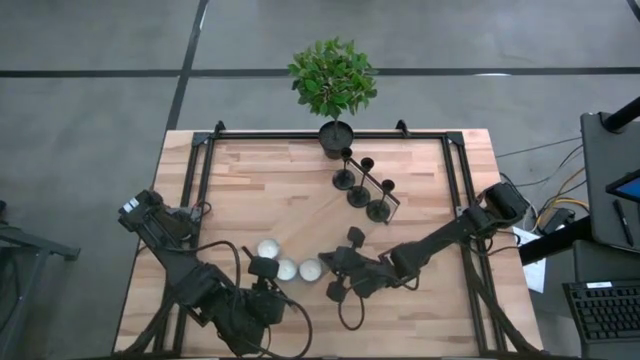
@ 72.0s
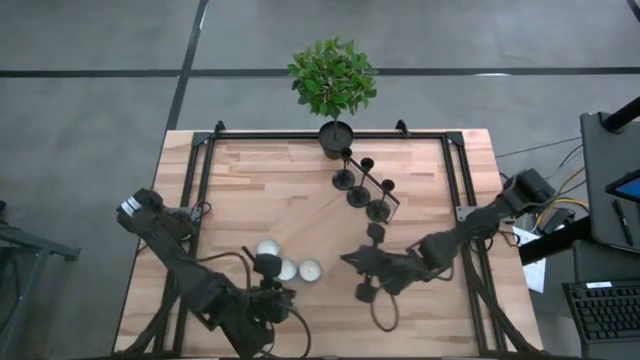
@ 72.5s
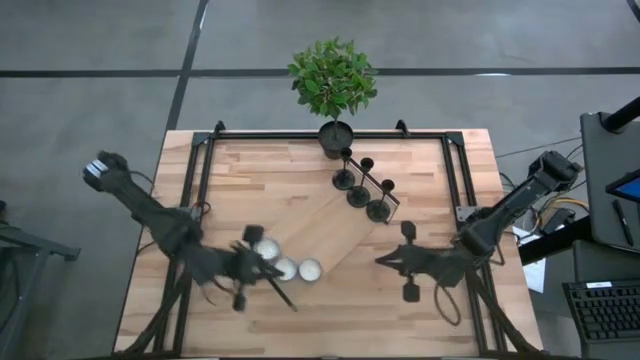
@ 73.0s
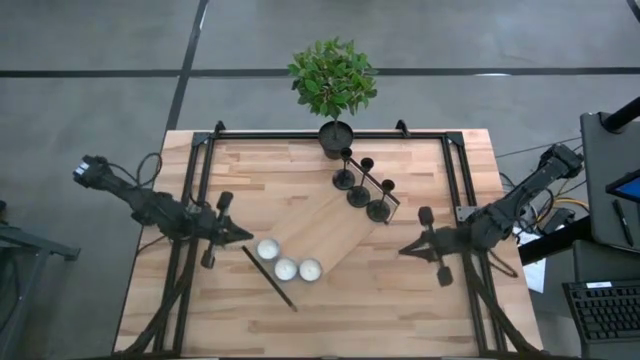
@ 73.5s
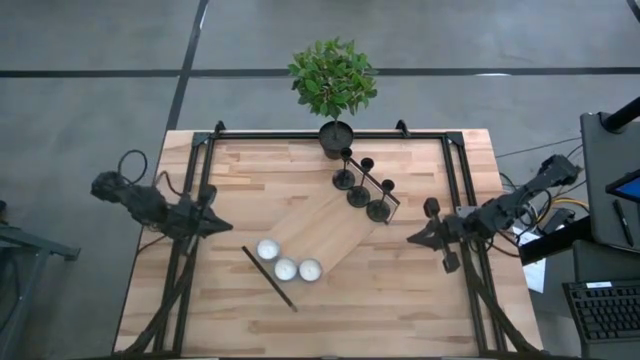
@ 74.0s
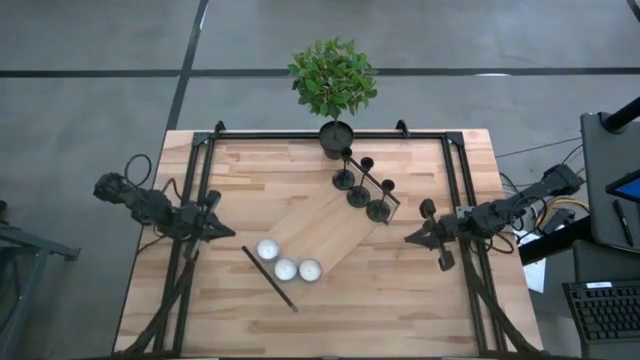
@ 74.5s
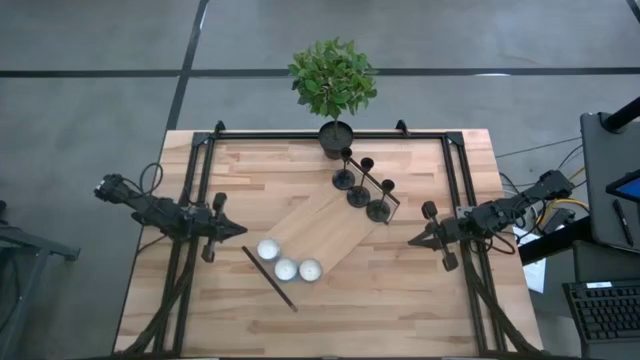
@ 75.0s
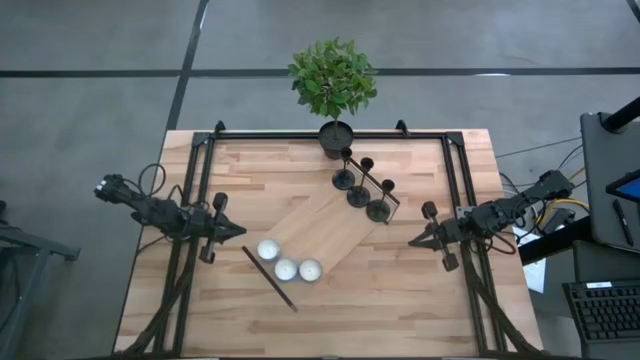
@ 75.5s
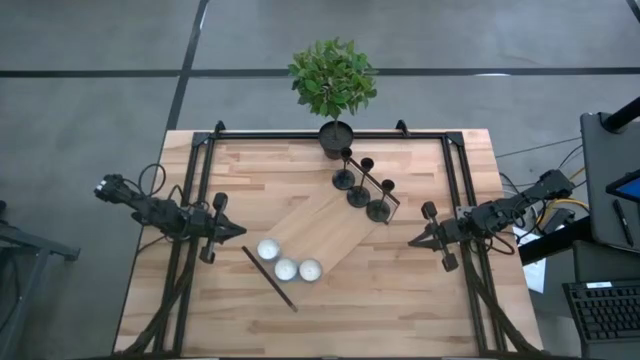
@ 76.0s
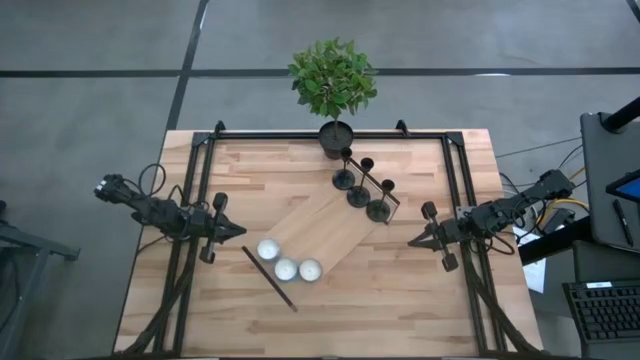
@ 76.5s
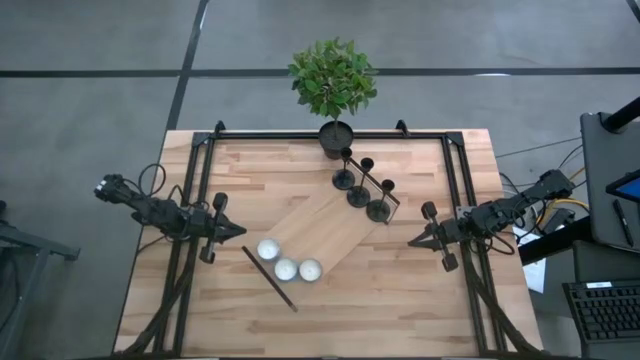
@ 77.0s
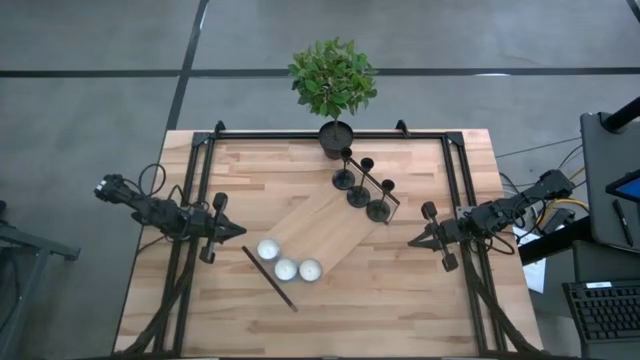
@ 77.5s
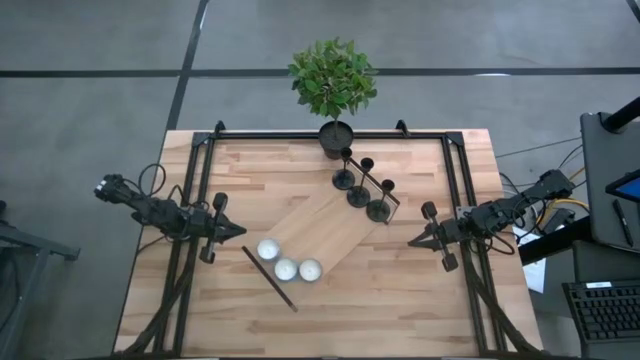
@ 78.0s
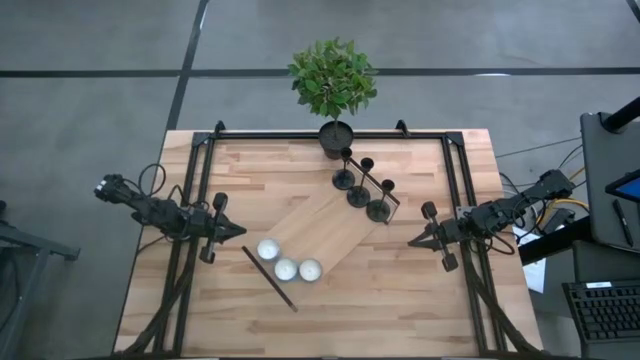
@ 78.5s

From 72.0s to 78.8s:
Task: Pick & Place candle stick holders
Return to Home Position

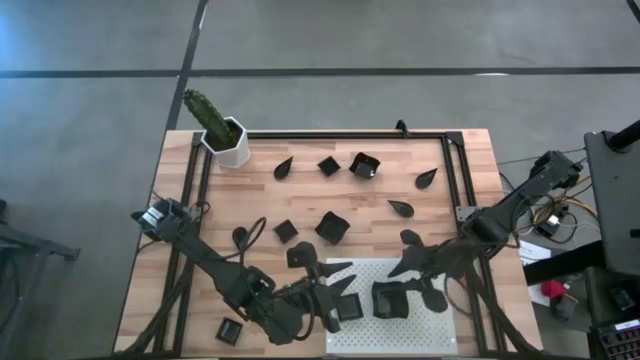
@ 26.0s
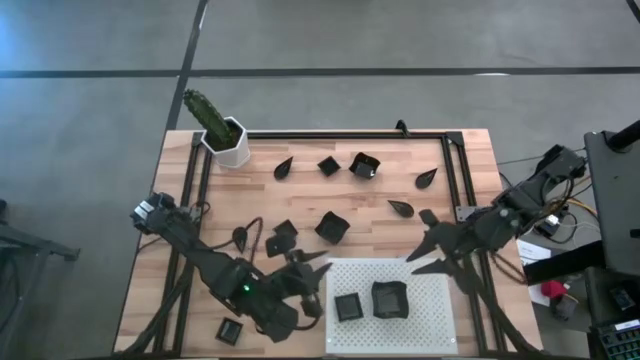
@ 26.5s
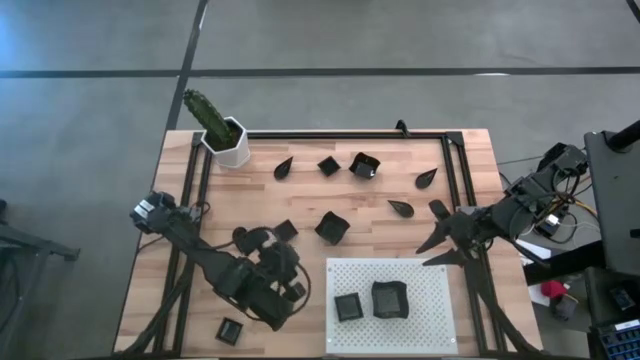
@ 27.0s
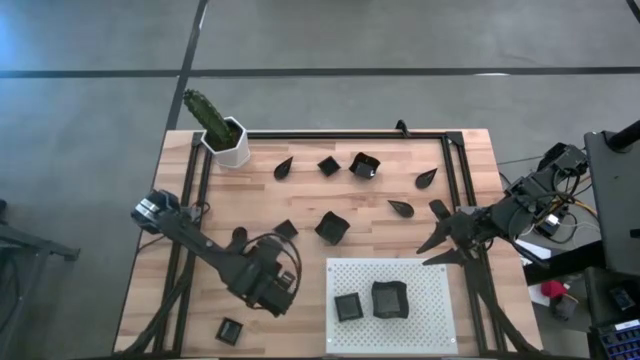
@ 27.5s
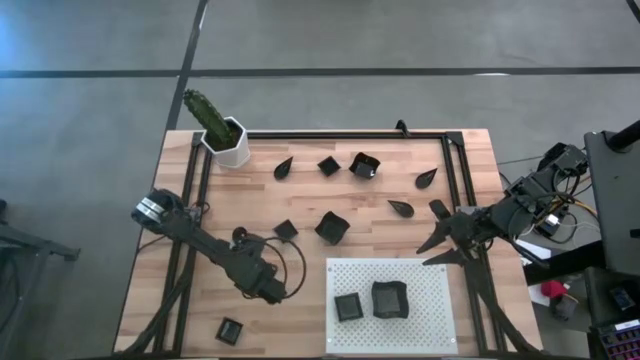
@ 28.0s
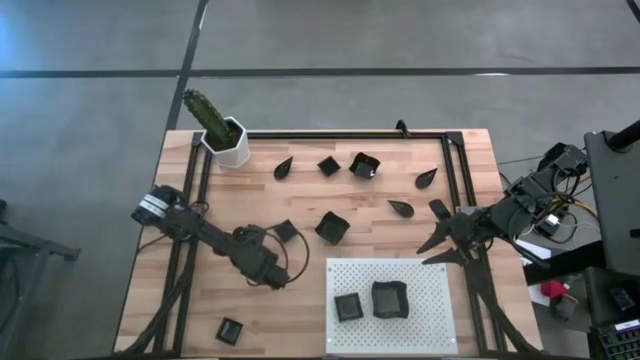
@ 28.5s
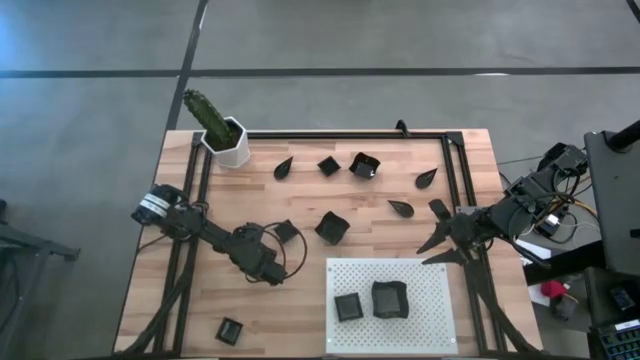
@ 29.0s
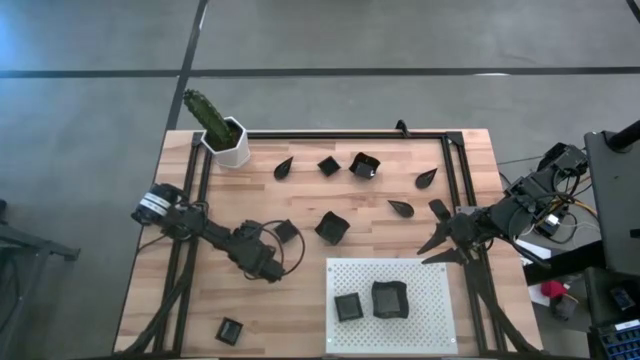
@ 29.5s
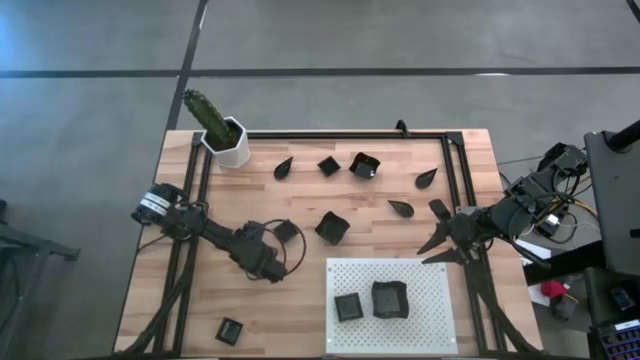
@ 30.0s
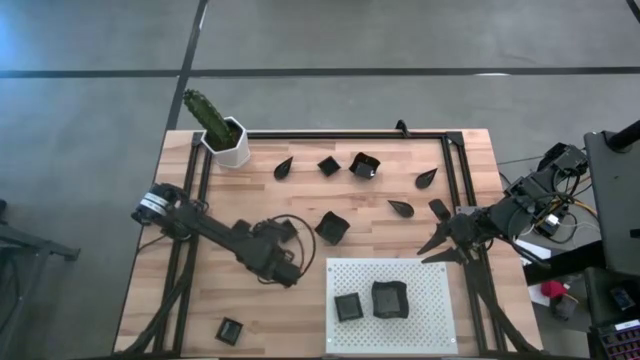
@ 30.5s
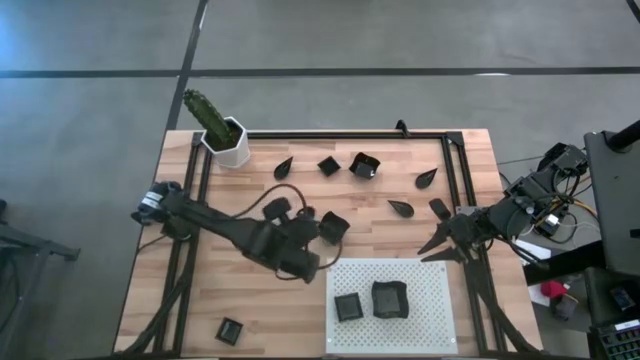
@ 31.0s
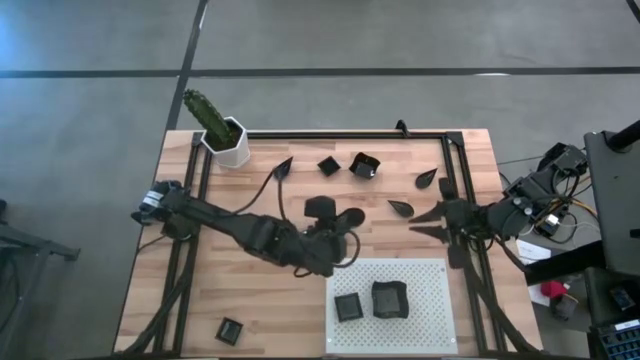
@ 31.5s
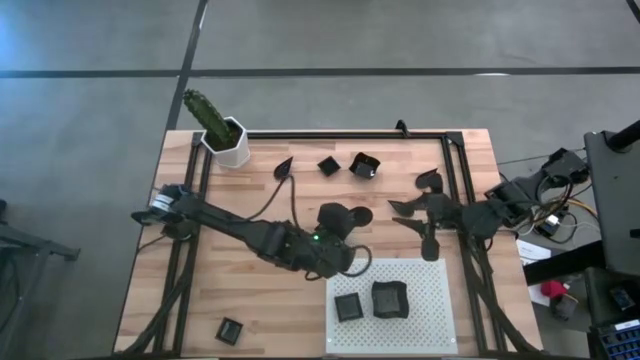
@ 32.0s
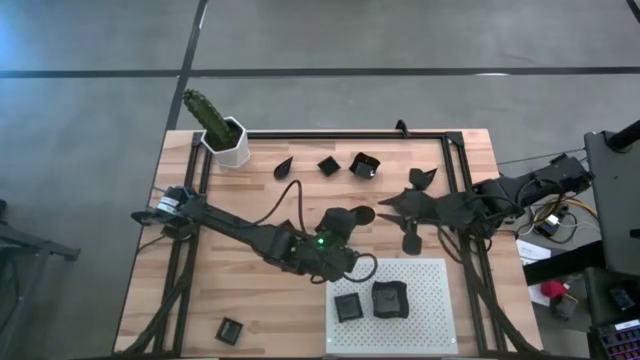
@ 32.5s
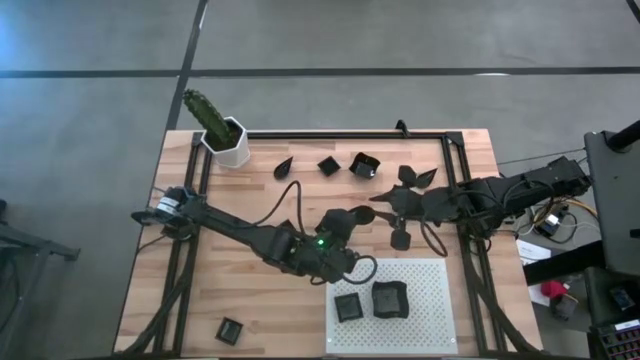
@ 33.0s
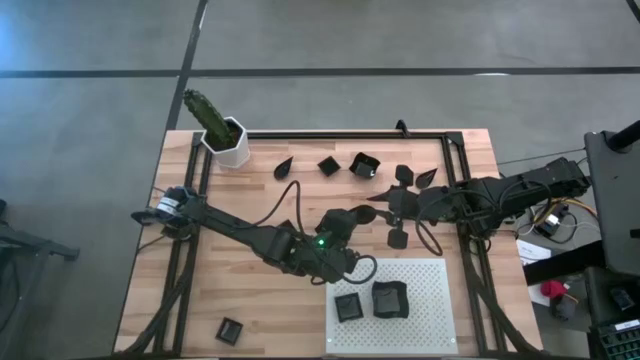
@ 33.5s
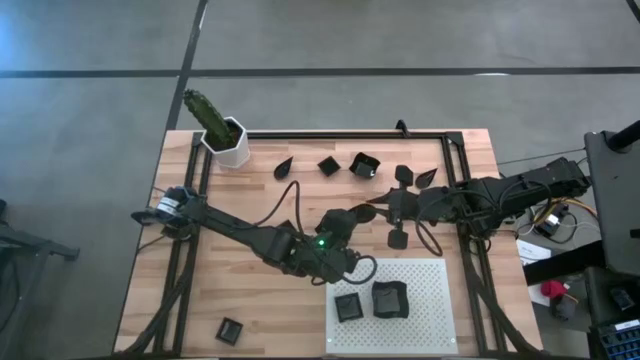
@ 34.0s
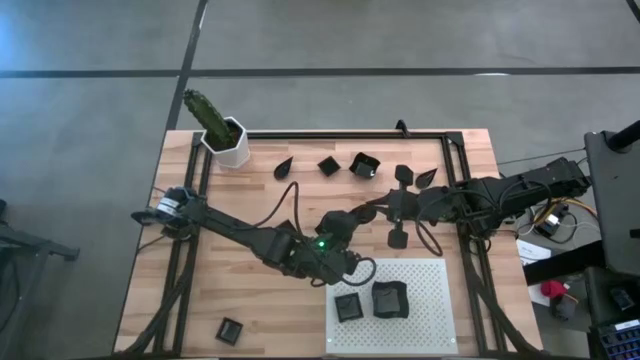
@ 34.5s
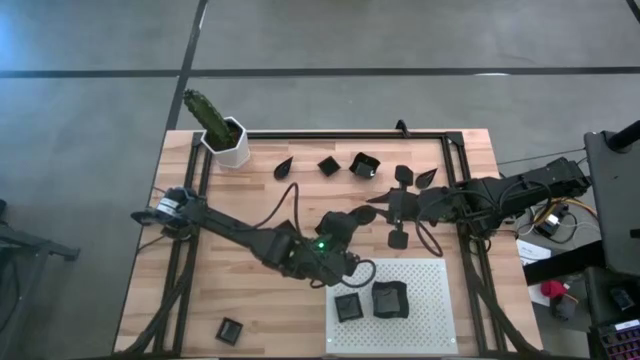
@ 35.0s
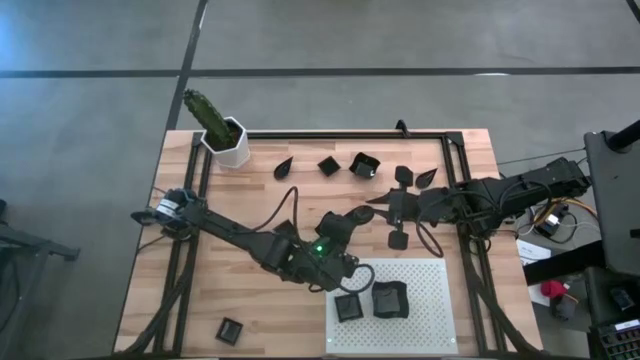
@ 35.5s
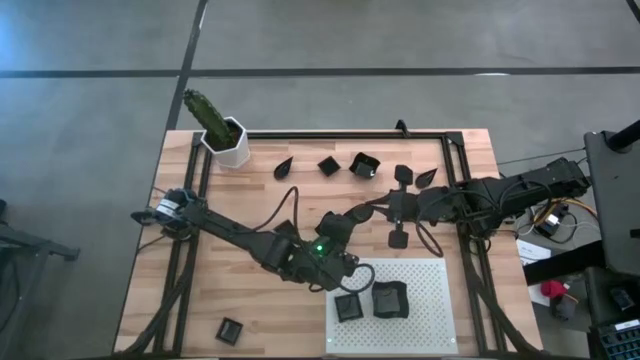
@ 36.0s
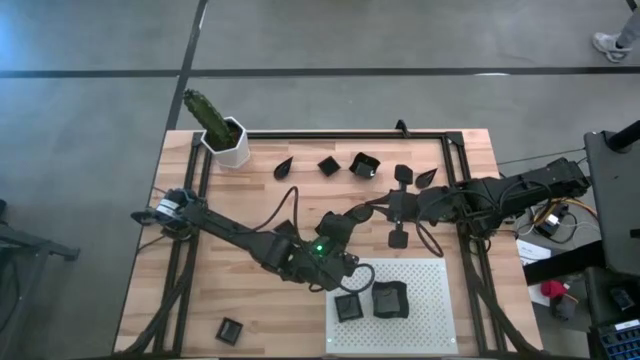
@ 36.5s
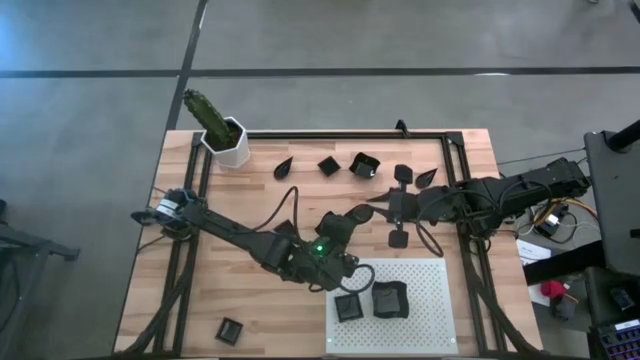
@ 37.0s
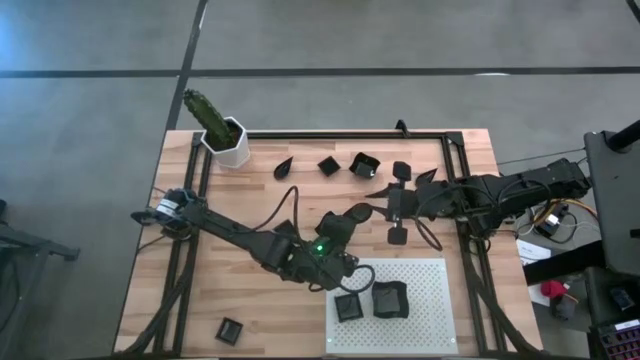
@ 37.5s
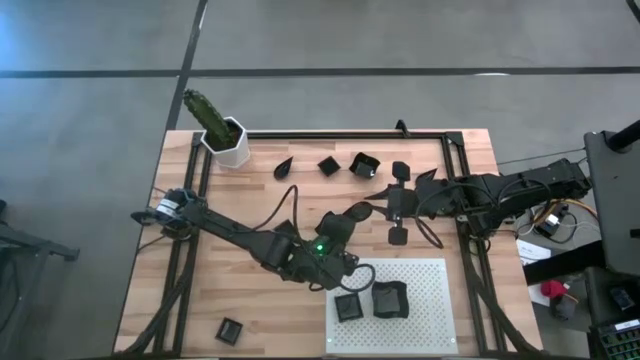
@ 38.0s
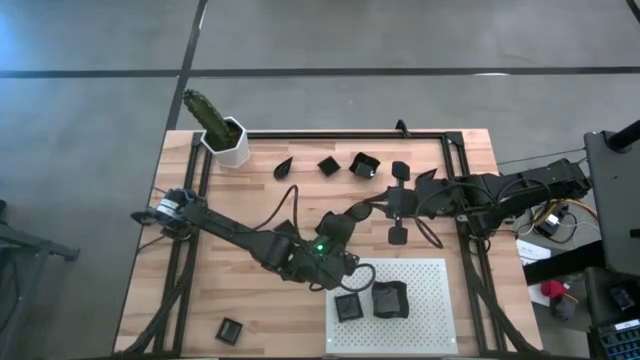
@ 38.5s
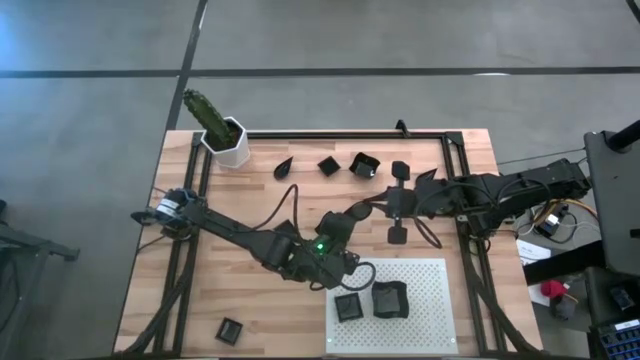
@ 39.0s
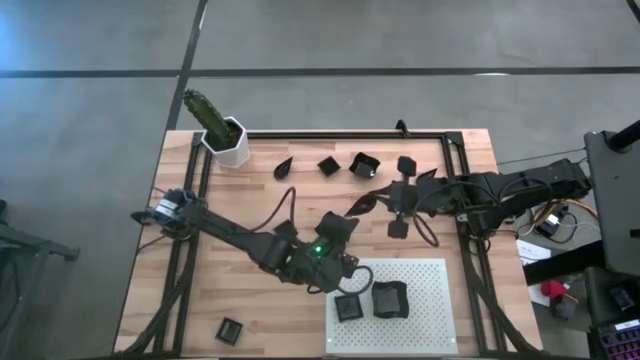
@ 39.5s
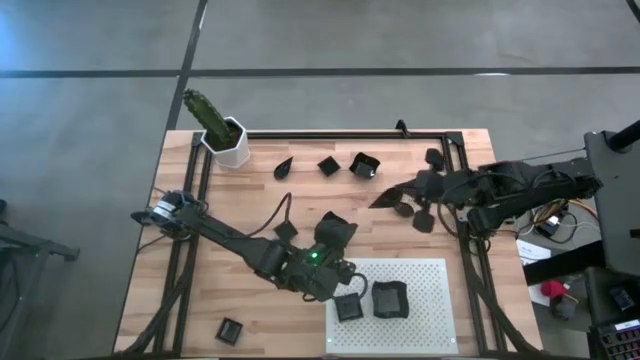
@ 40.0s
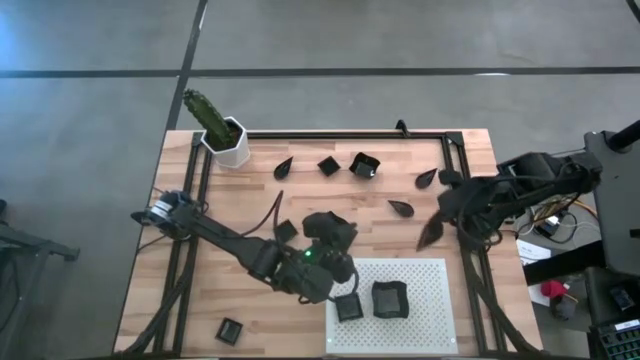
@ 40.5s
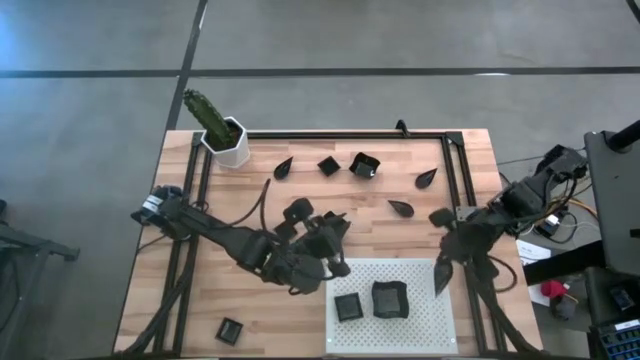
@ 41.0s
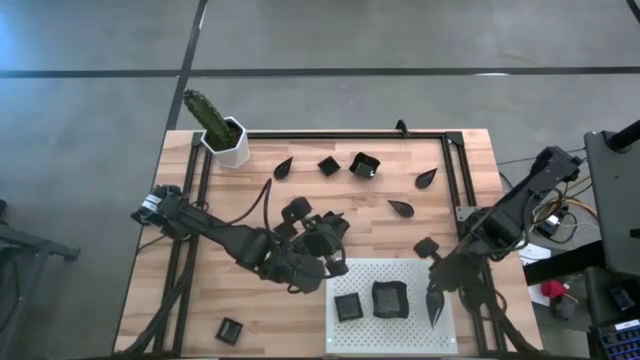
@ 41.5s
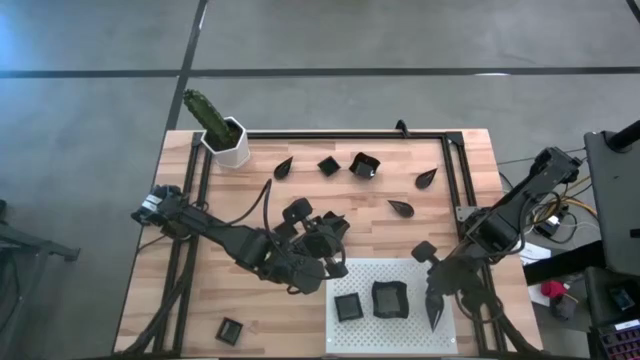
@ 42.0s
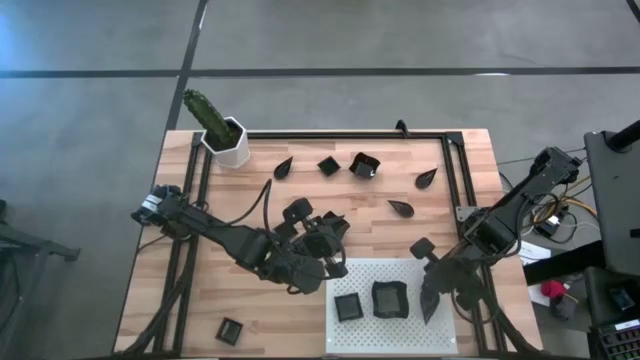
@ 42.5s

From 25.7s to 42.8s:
Task: Pick & Place Mini shaped plates
Put the drop-shaped plate on the shelf
